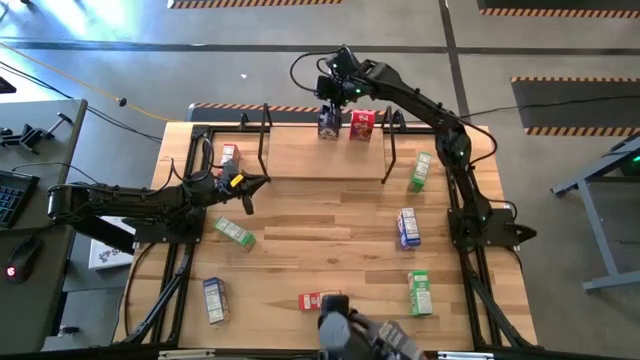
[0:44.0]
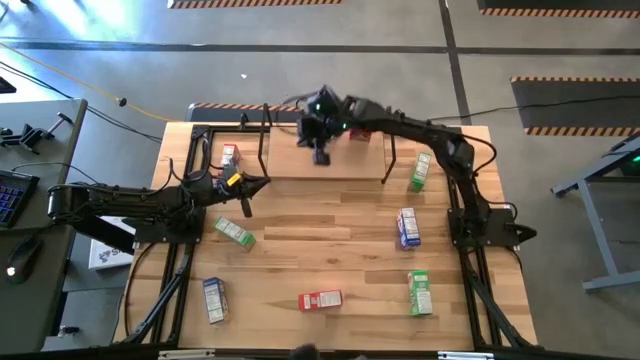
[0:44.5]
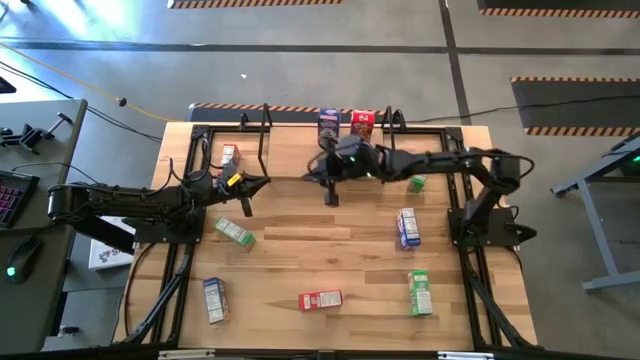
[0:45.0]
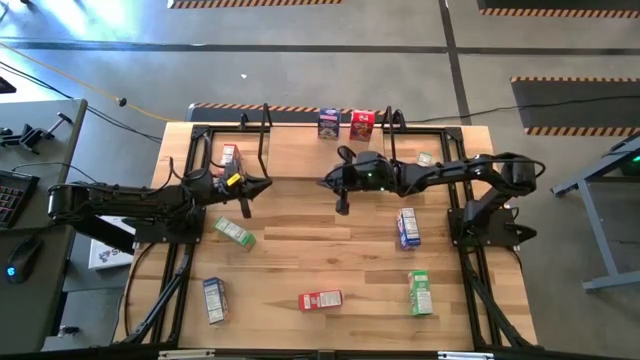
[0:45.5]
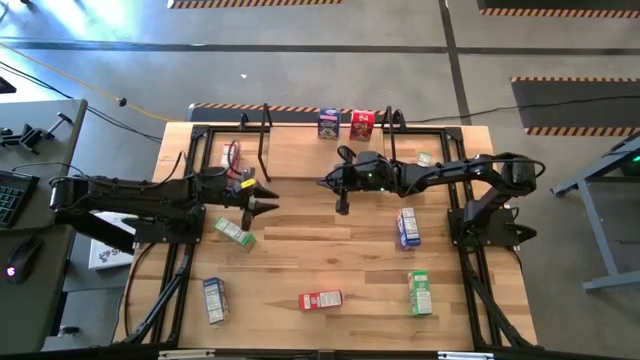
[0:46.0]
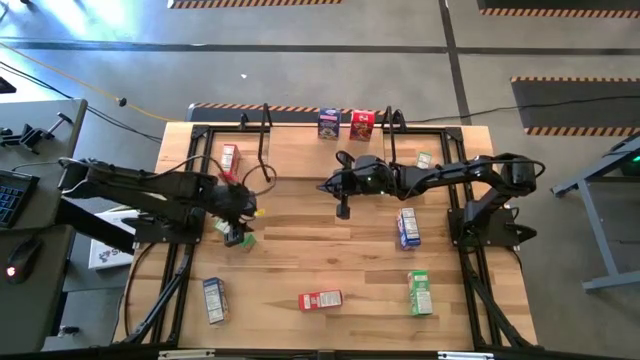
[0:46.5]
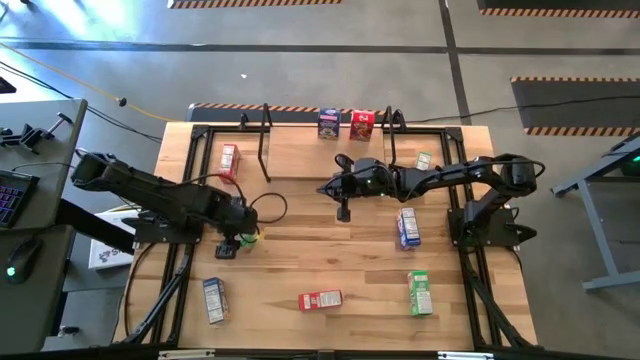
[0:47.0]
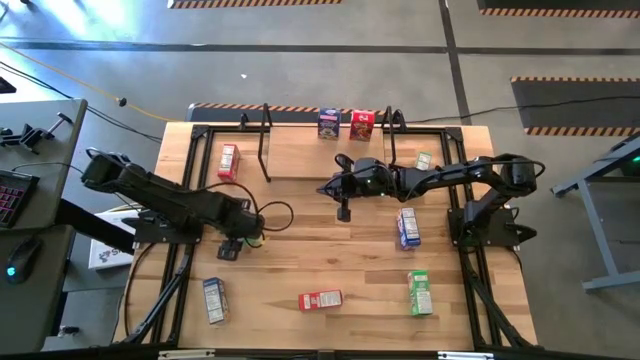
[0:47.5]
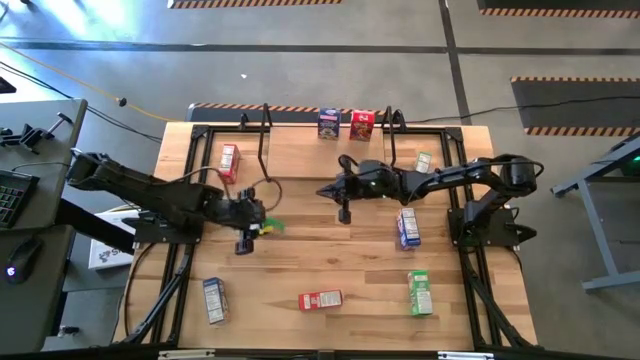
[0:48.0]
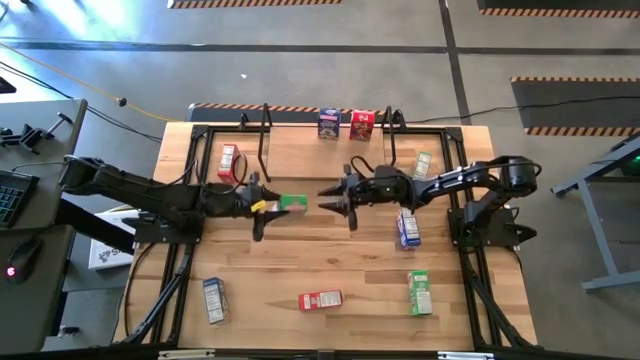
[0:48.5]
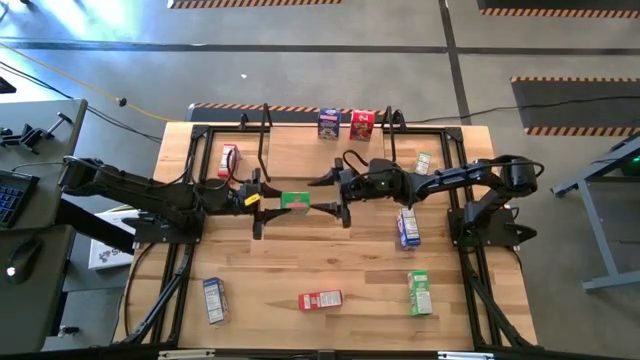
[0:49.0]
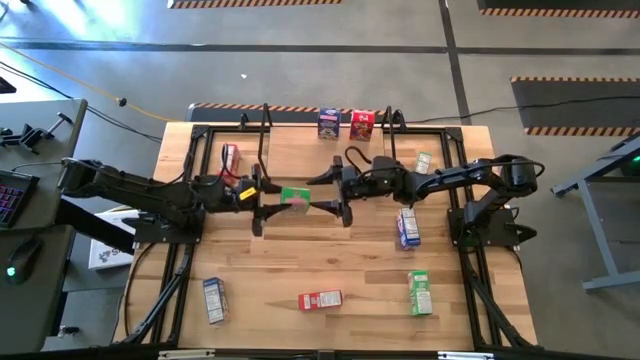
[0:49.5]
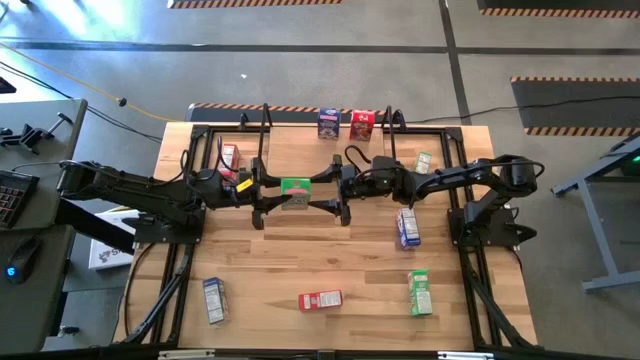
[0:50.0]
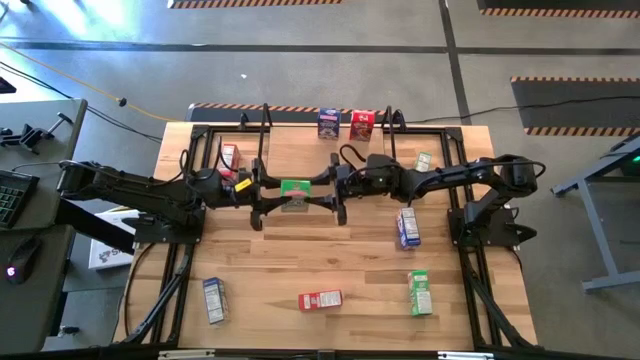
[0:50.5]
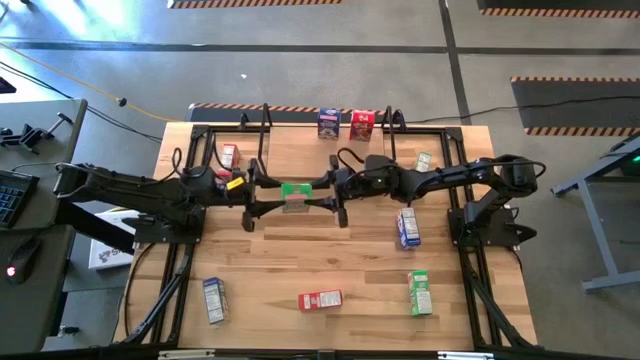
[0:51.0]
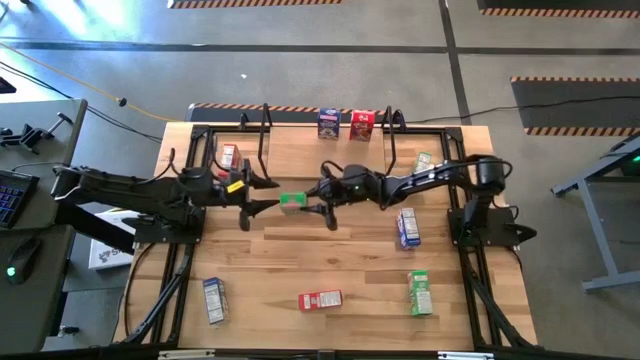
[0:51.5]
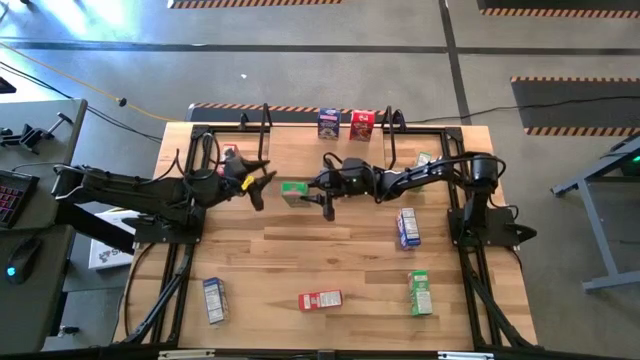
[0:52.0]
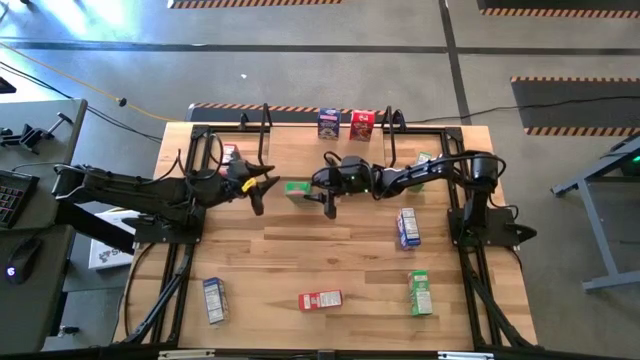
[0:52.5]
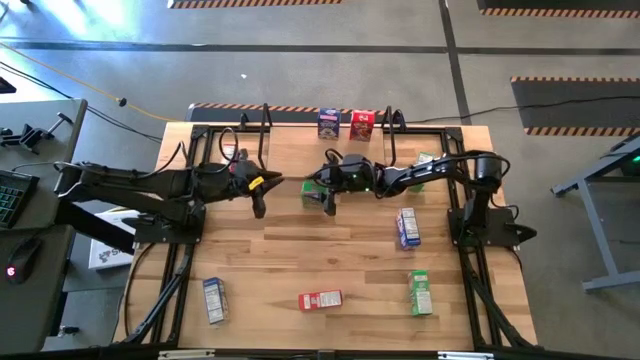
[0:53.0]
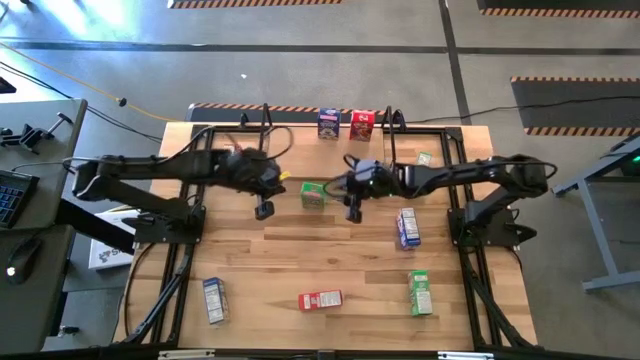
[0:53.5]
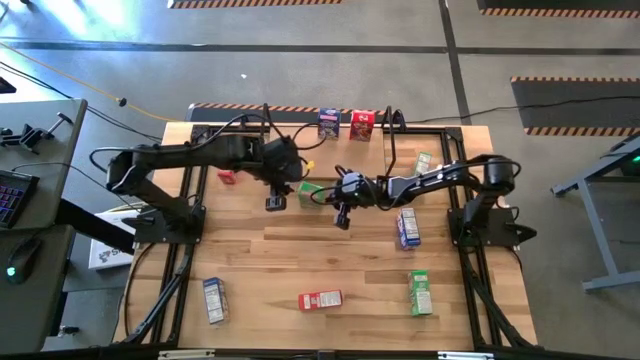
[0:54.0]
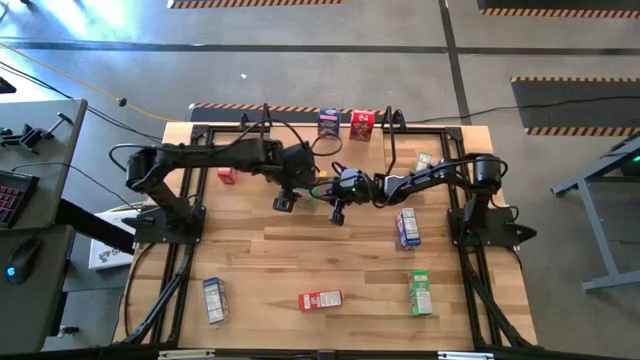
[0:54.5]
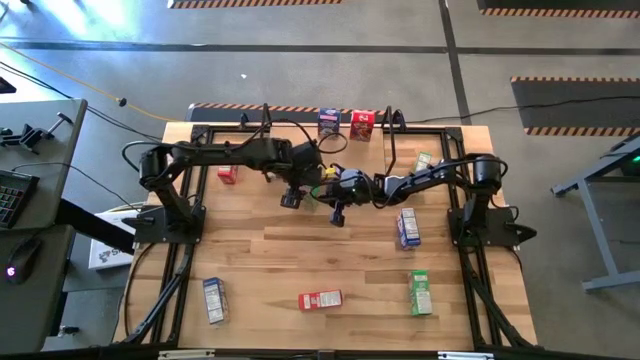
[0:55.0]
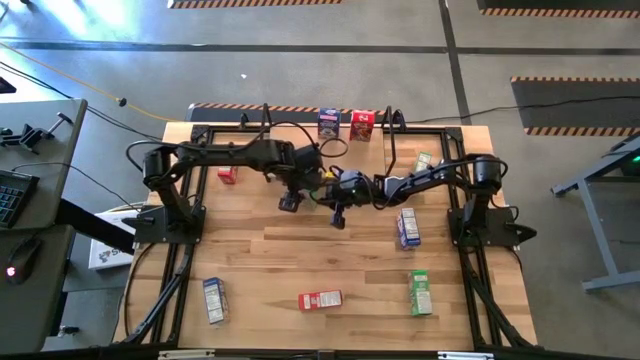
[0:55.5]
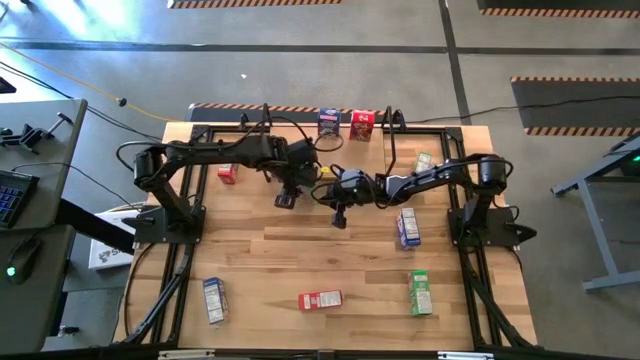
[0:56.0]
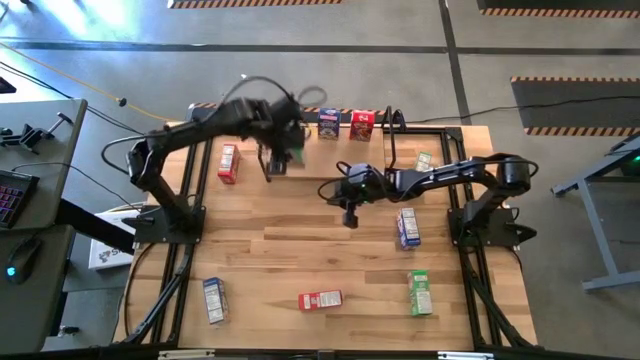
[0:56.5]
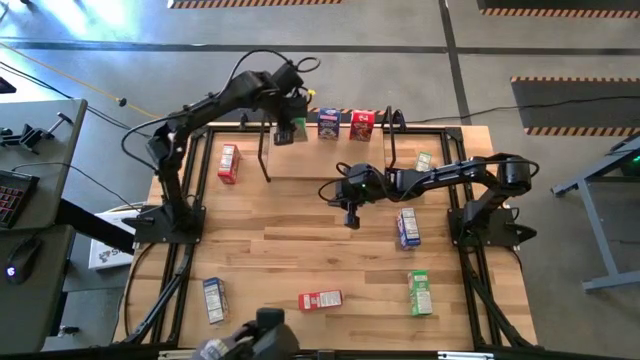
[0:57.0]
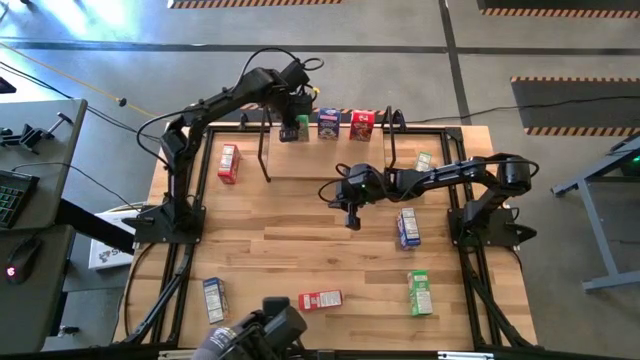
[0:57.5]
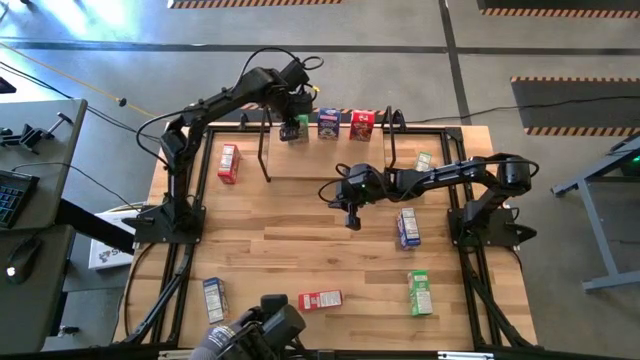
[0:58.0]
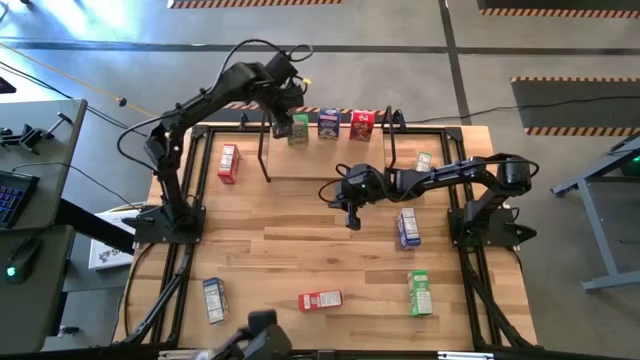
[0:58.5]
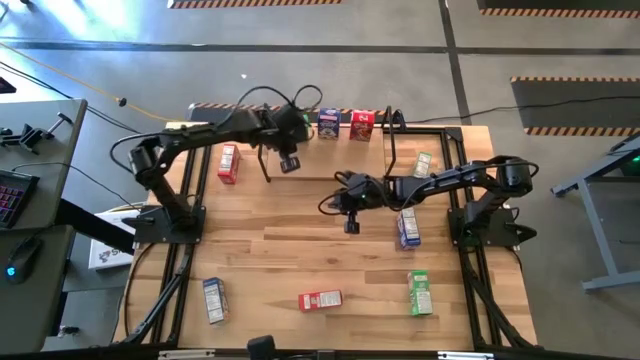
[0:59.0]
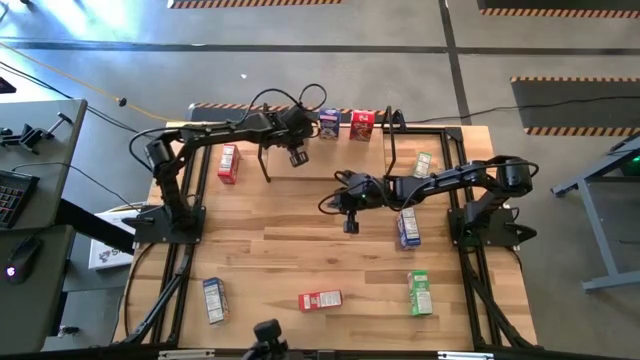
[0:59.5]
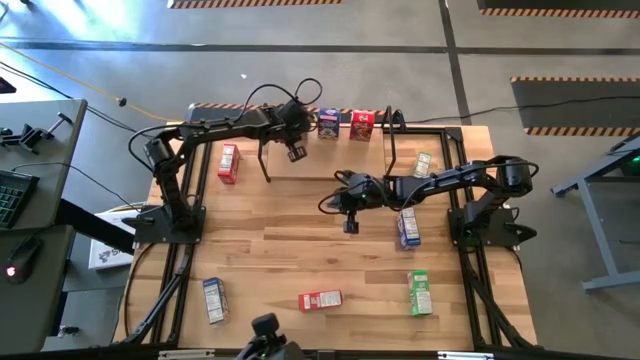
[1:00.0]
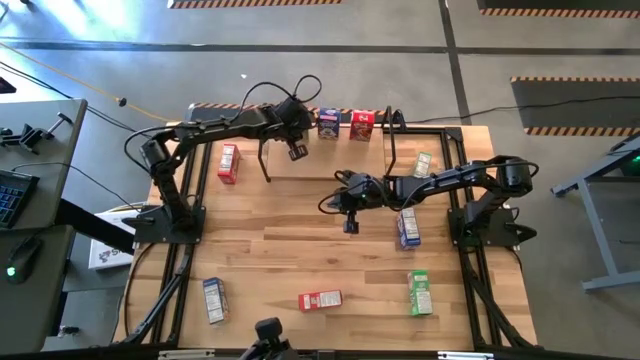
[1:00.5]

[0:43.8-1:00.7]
Task: Stack cereal on shelf
Put the left green cereal box on the shelf

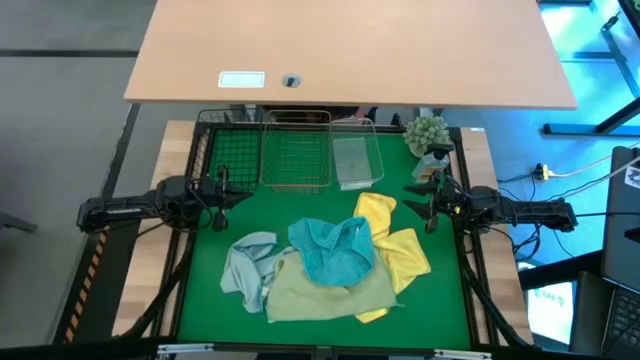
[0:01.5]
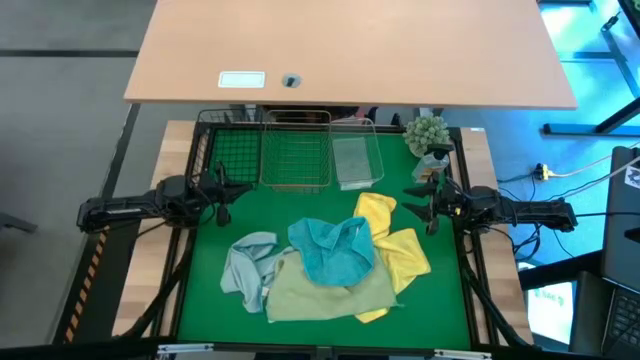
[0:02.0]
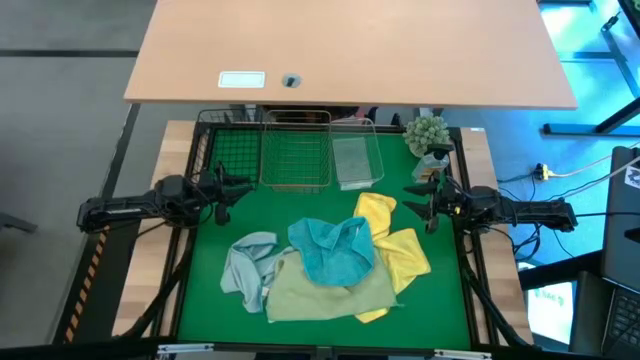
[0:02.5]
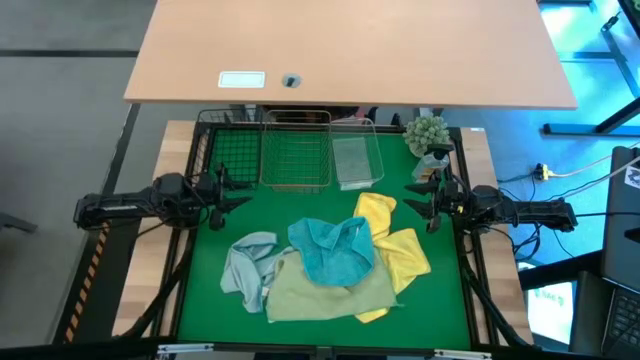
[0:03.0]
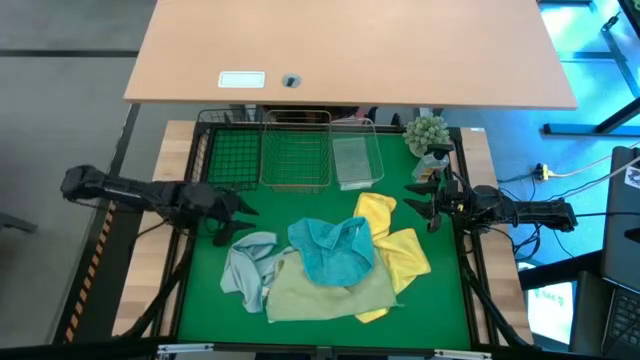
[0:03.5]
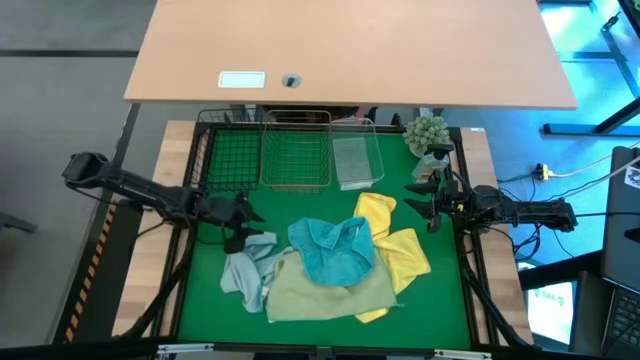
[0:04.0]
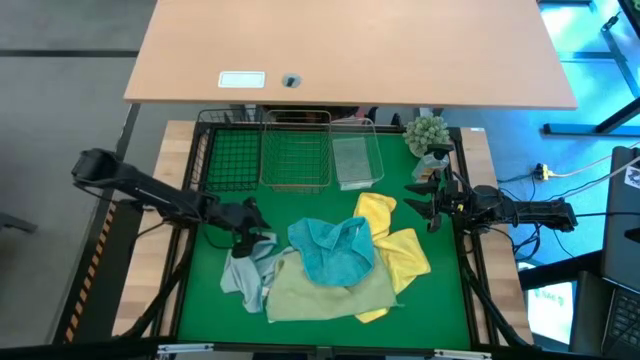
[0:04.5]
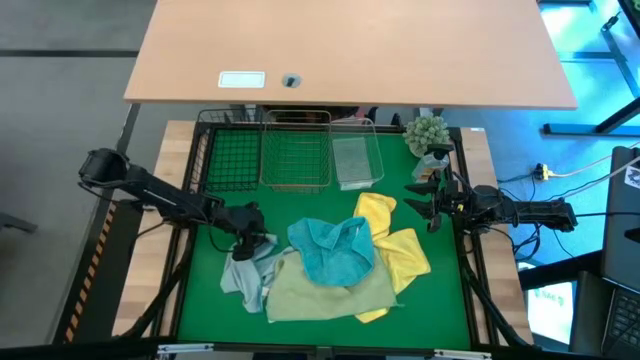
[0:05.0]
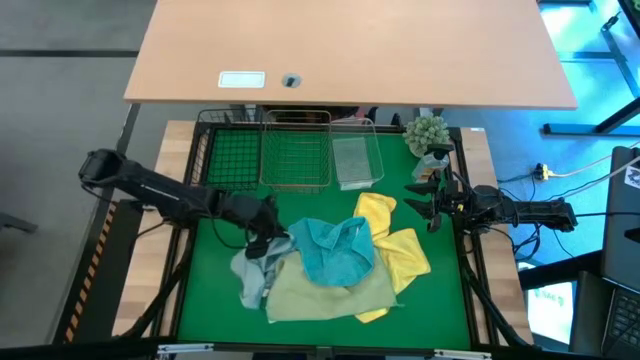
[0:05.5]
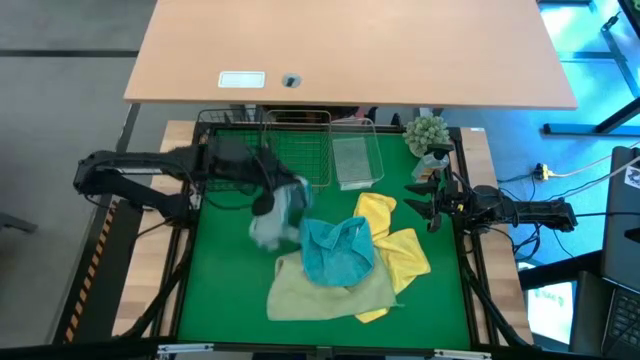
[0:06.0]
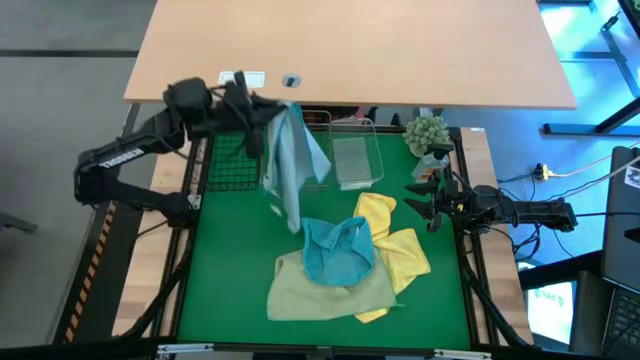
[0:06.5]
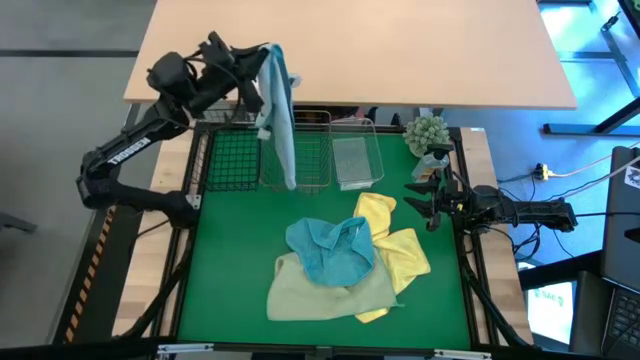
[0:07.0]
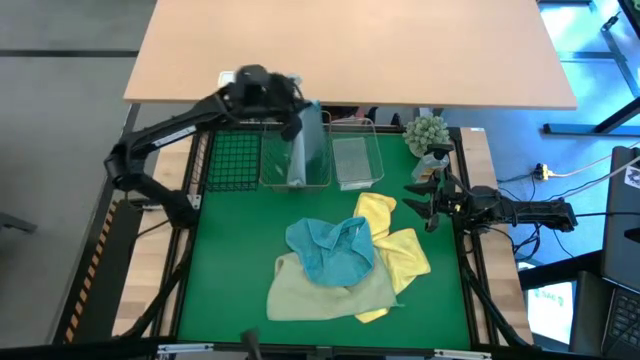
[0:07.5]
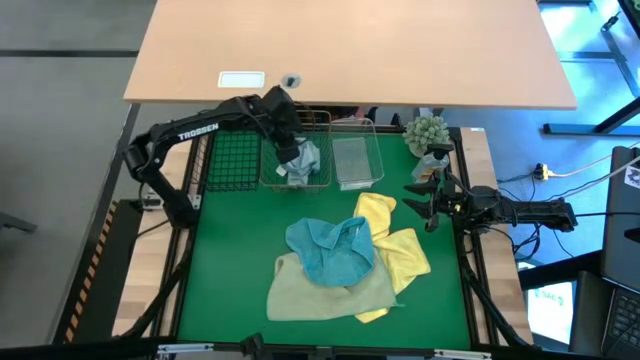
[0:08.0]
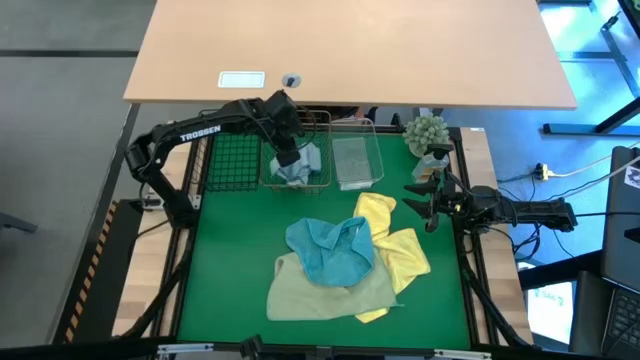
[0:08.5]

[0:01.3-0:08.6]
Task: Sort microfiber towel by color & place in baskets
Put the light blue microfiber towel into the golden wire basket
